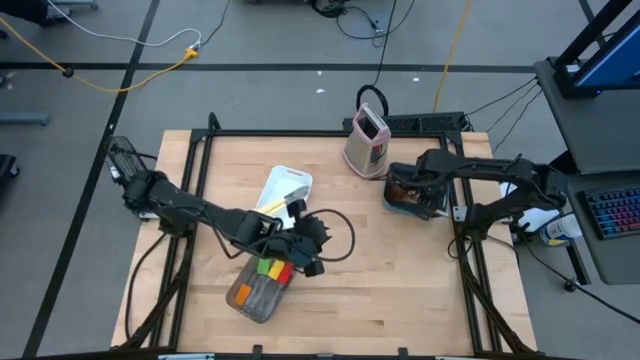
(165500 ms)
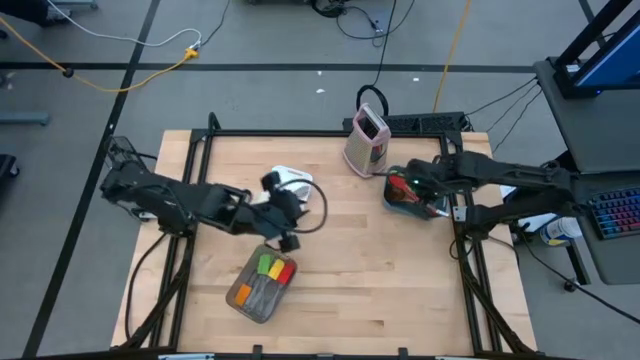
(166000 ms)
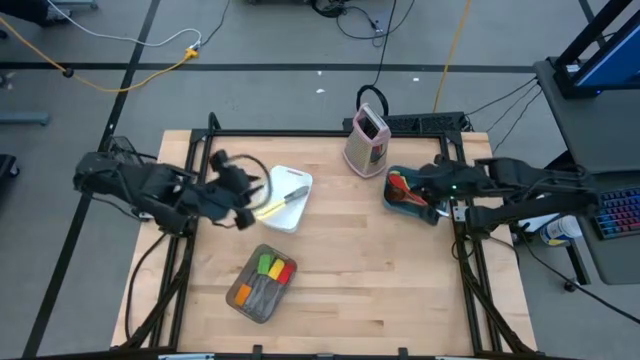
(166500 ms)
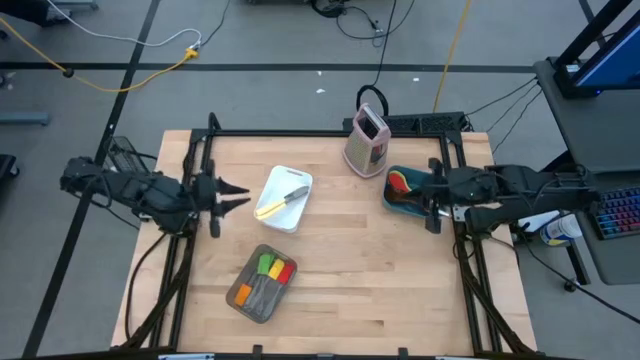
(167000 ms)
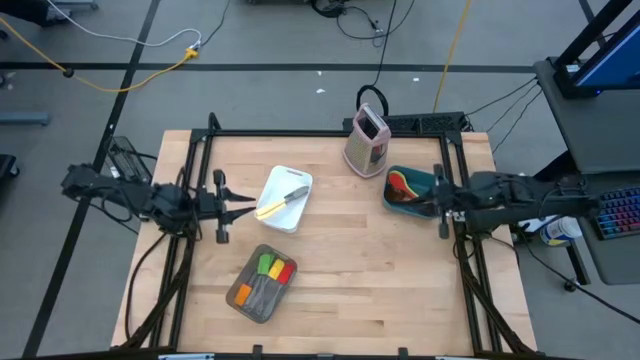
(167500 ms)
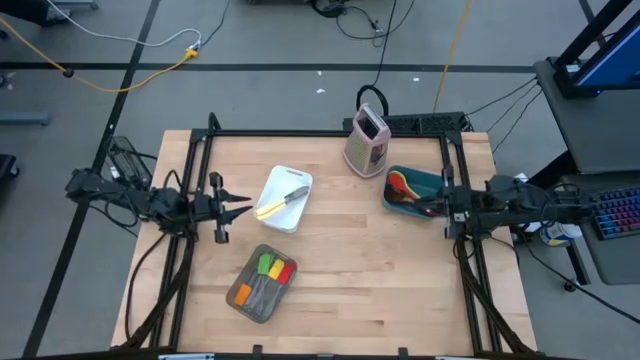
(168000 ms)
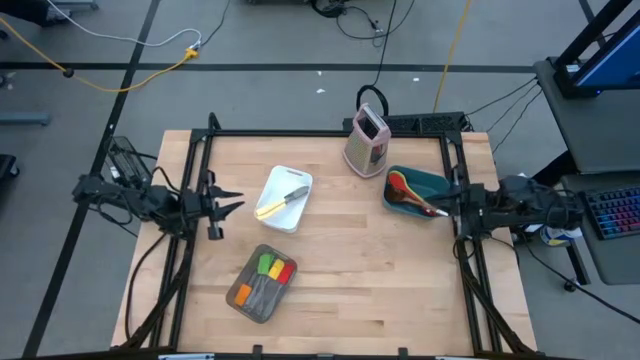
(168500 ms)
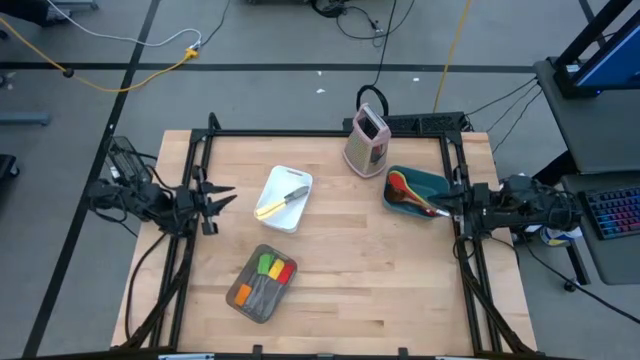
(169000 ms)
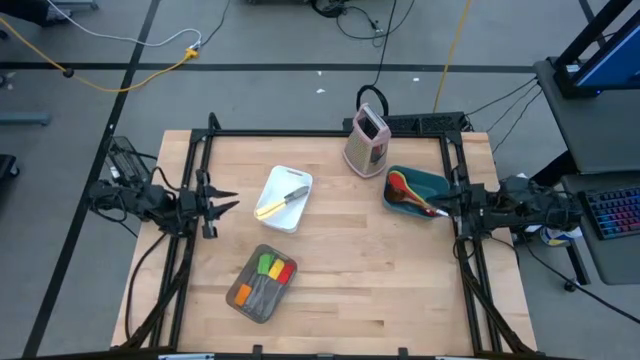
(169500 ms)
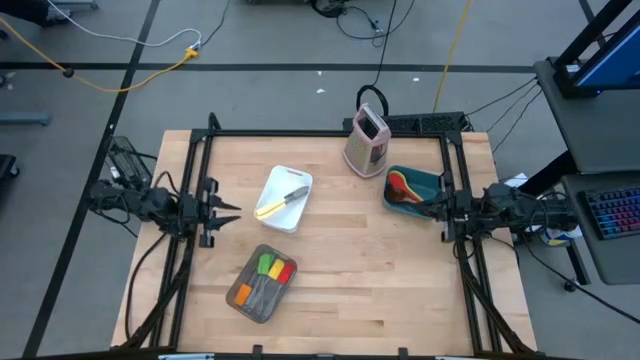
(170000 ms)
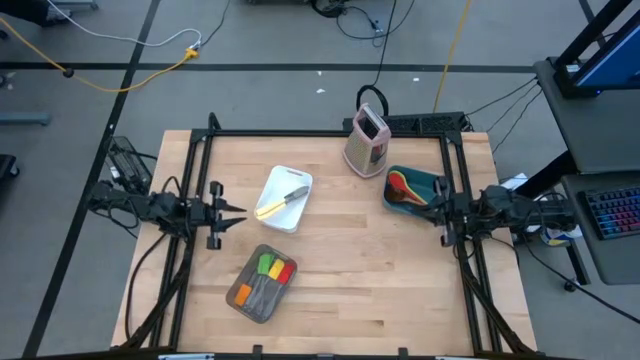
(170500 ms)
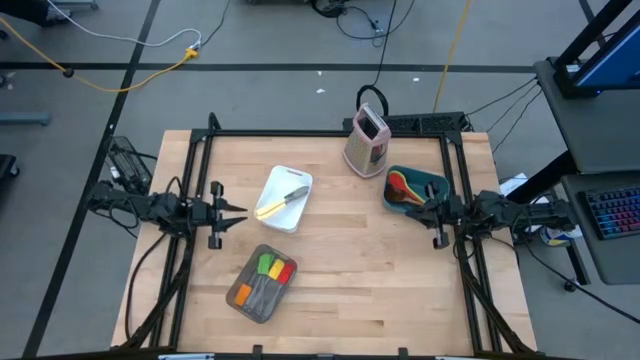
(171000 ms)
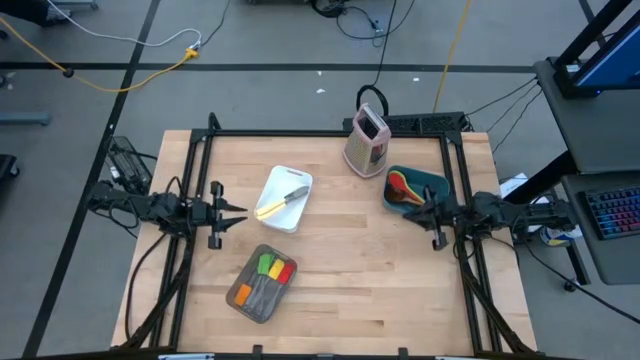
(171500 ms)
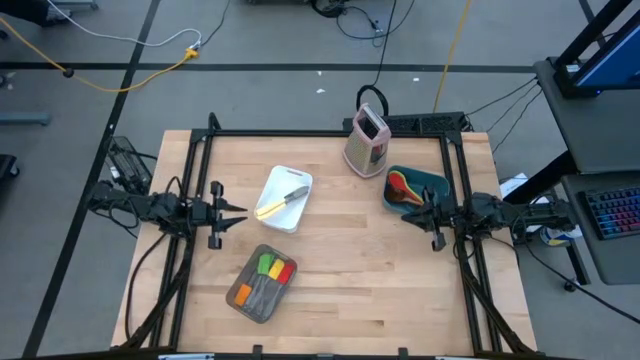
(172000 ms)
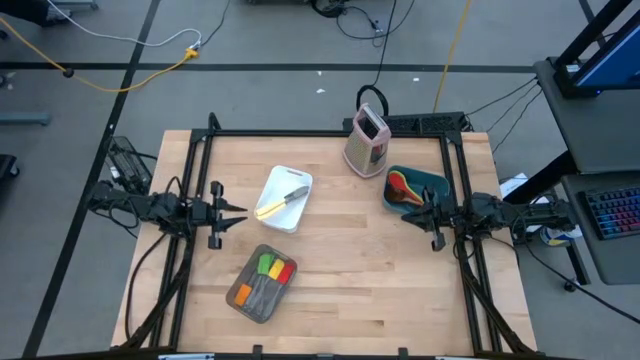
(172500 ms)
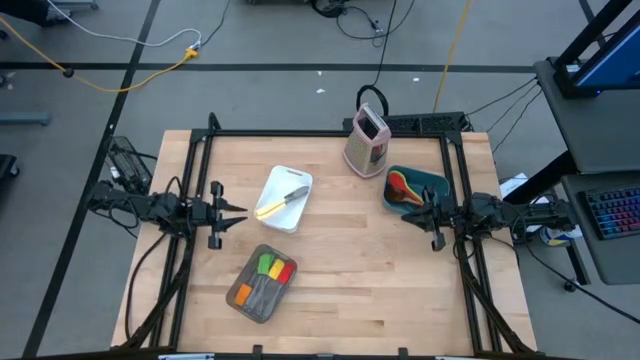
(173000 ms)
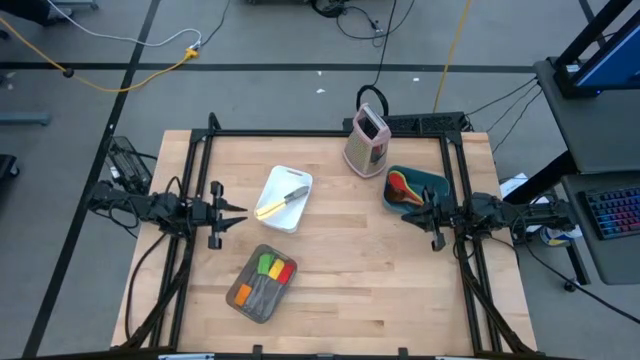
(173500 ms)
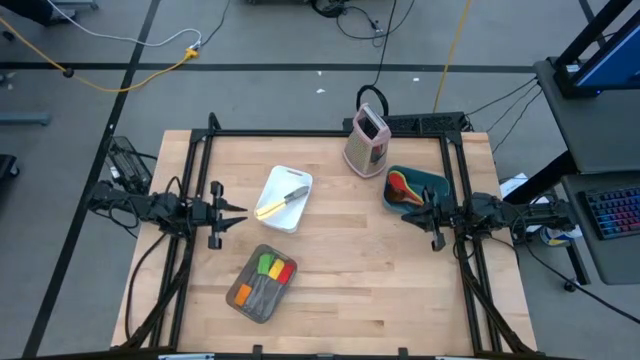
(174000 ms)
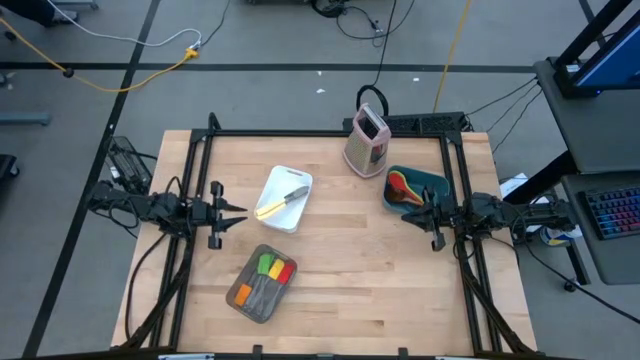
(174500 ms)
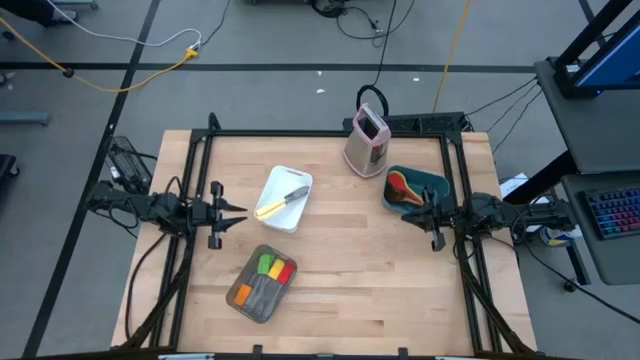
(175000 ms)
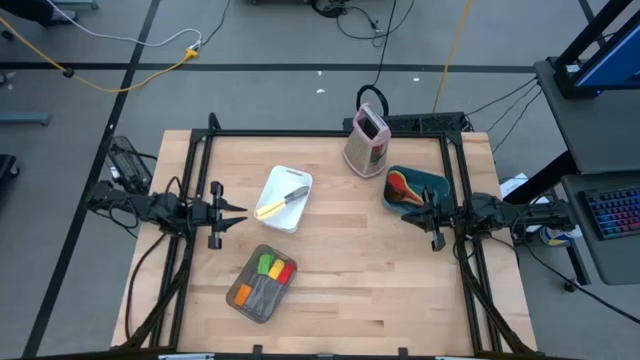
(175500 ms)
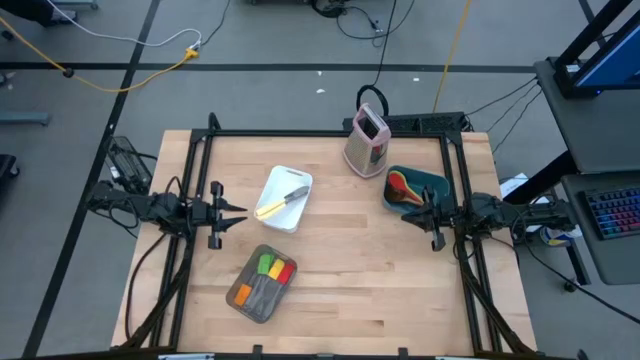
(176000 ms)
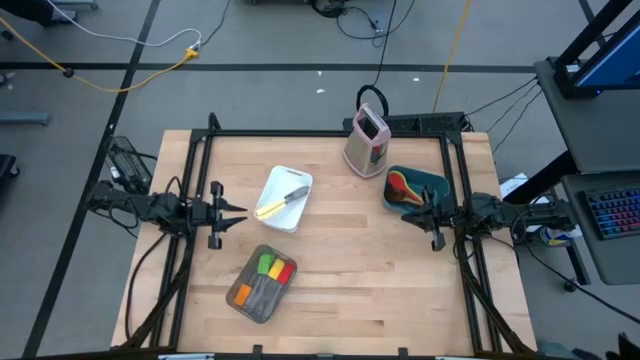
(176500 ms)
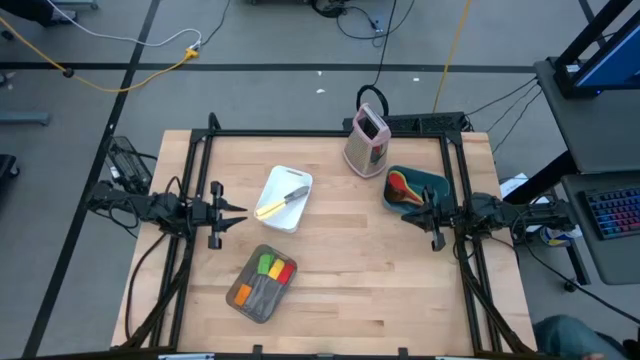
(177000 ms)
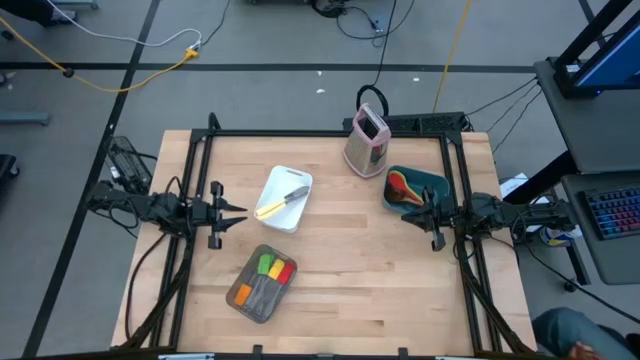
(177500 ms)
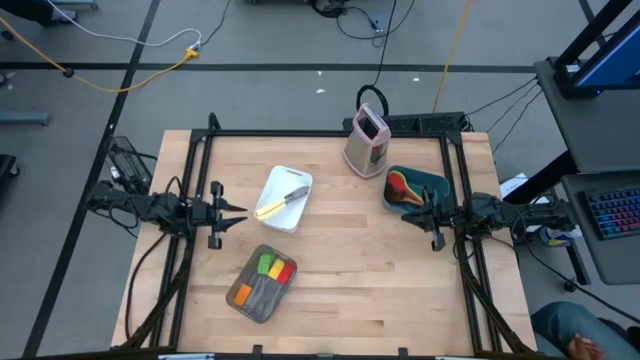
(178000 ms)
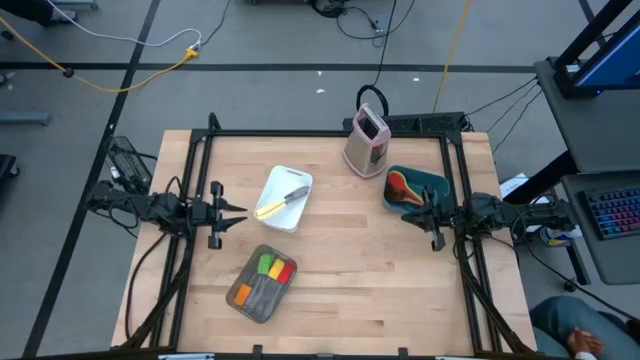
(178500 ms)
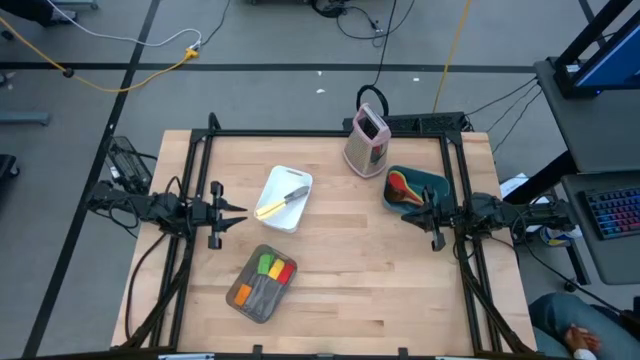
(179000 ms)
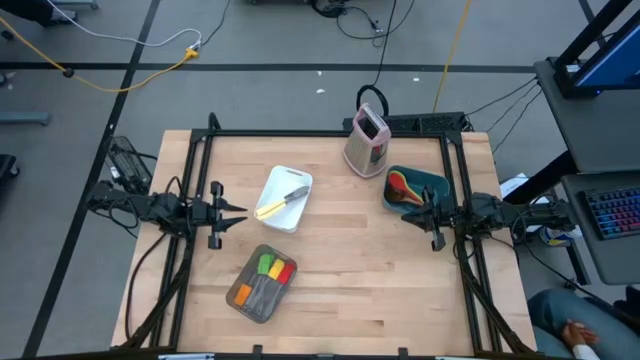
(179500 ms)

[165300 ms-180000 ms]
Task: Pick & Place Kitchen Items
Return to Home Position

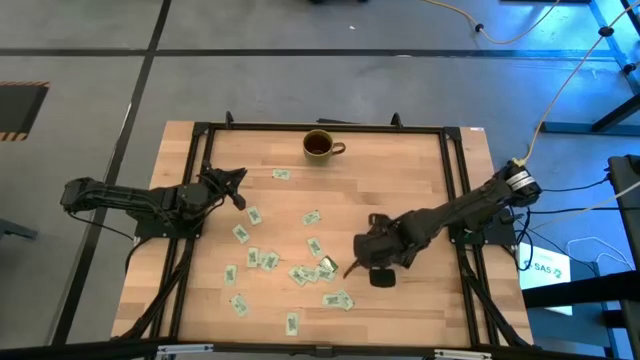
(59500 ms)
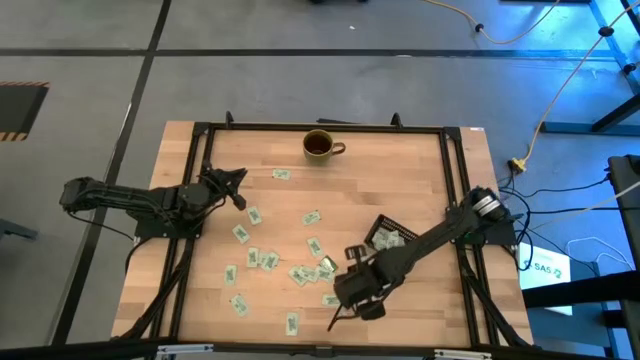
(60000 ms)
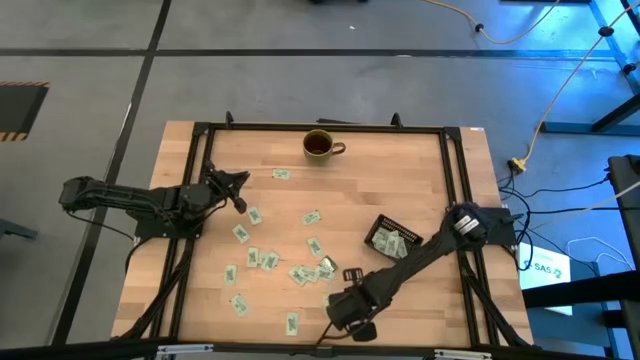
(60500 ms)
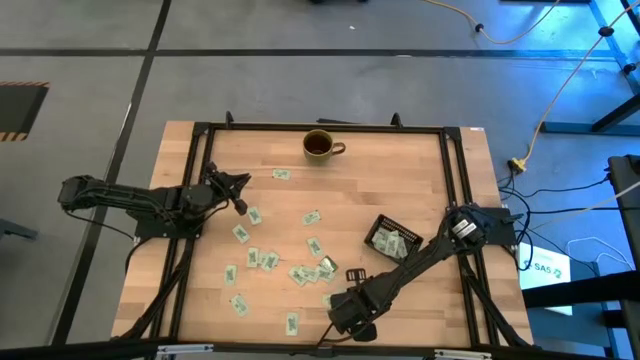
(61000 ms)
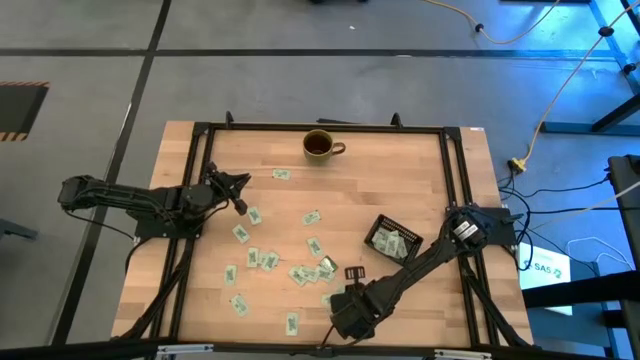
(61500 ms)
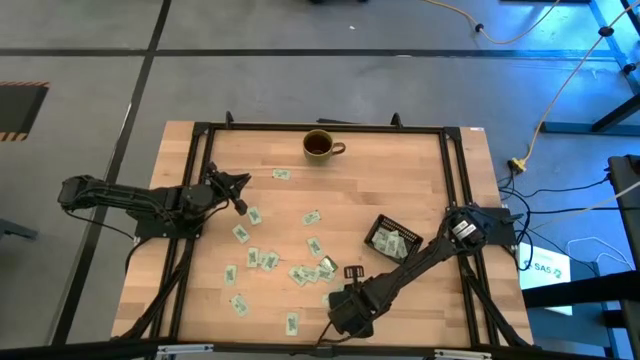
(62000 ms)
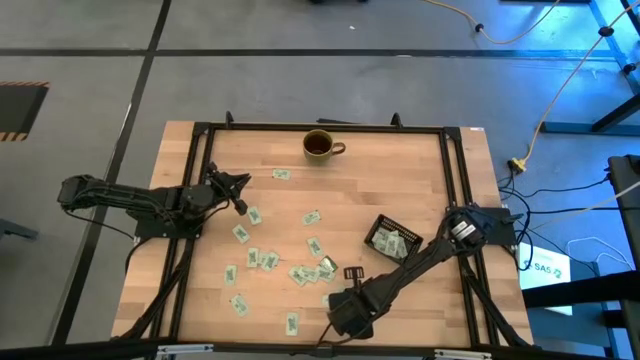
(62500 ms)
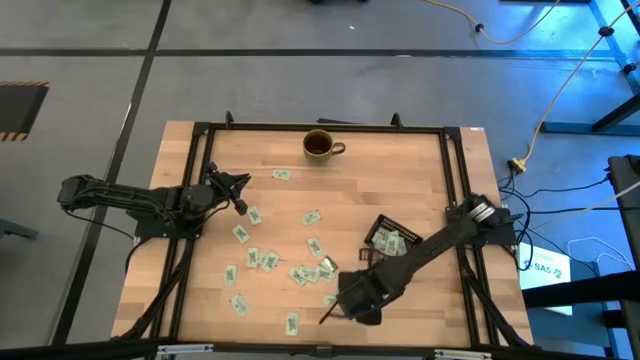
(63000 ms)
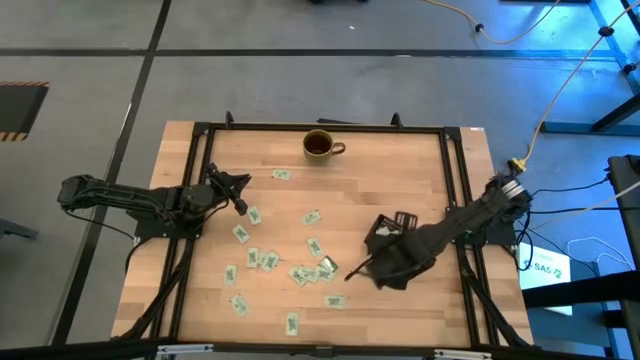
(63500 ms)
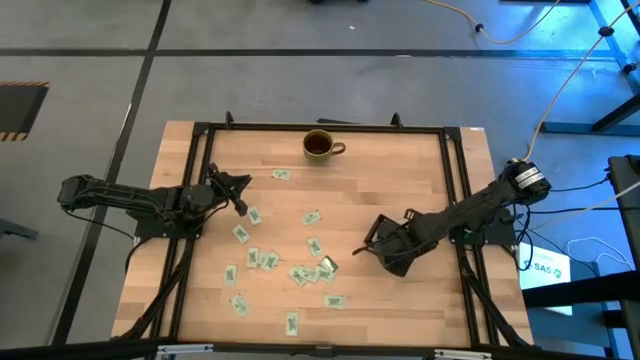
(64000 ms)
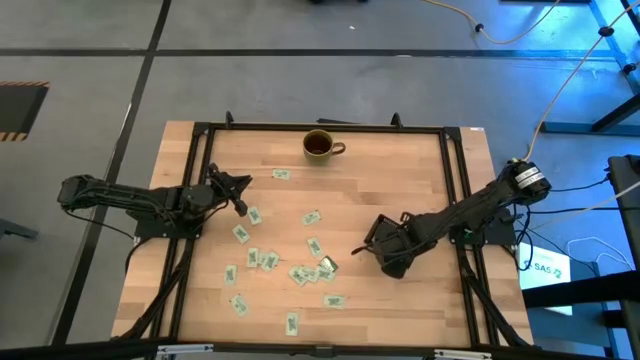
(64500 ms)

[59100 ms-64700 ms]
Task: Pick and place Stevia / Truvia into bins
Put the stevia packet into the black bin
